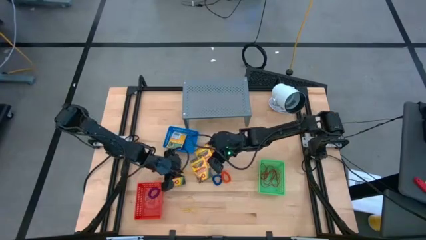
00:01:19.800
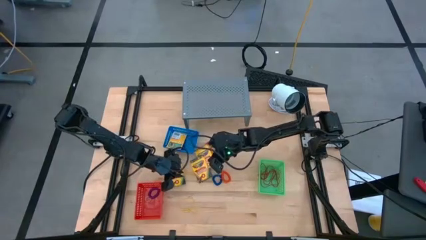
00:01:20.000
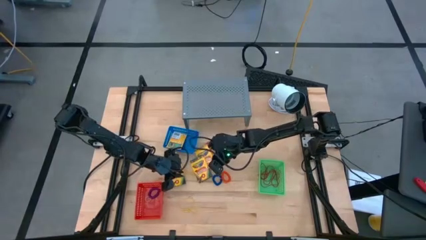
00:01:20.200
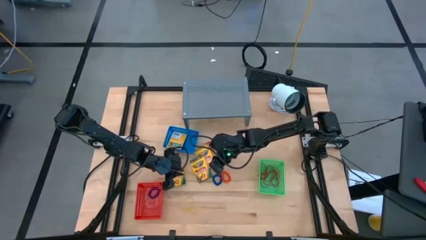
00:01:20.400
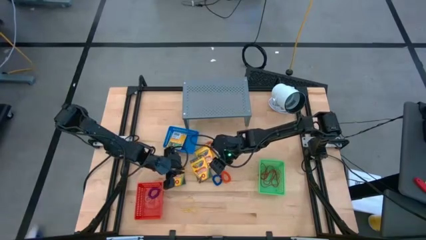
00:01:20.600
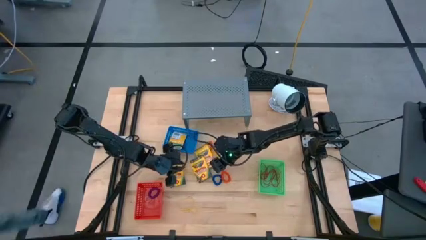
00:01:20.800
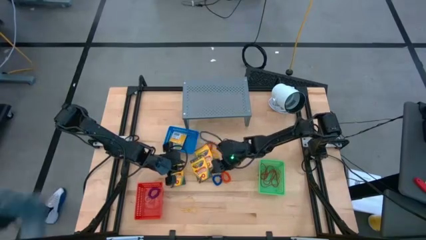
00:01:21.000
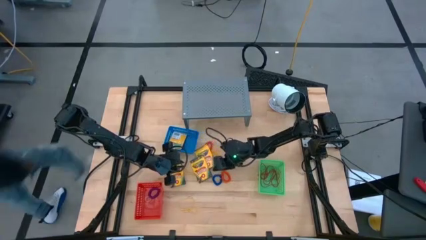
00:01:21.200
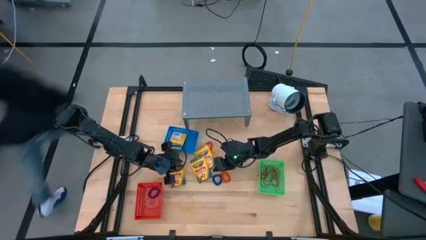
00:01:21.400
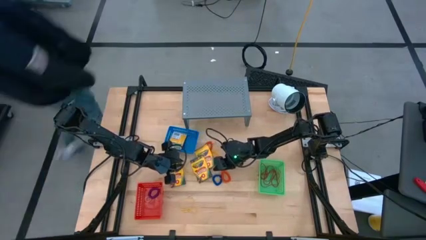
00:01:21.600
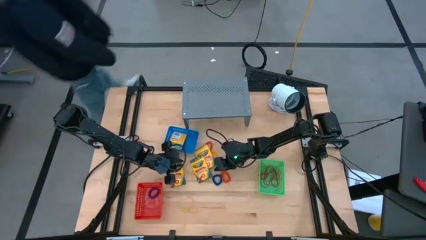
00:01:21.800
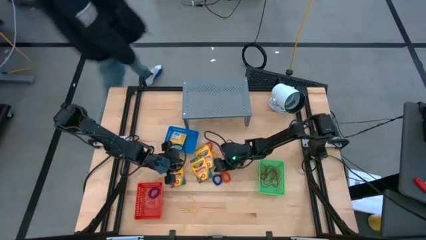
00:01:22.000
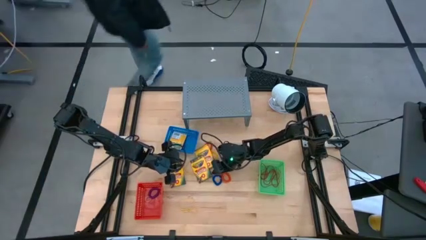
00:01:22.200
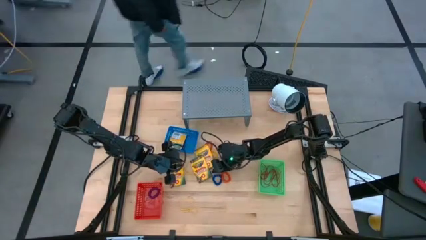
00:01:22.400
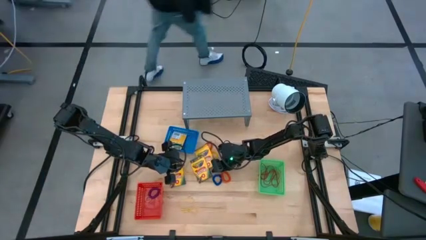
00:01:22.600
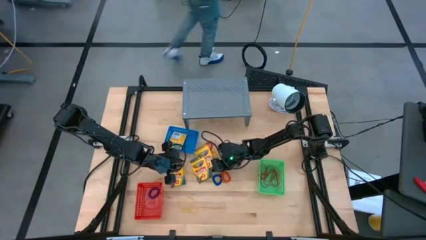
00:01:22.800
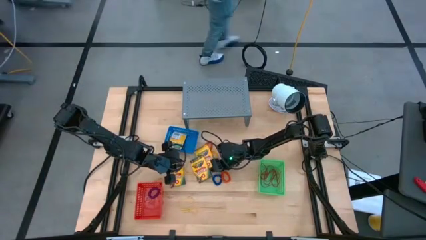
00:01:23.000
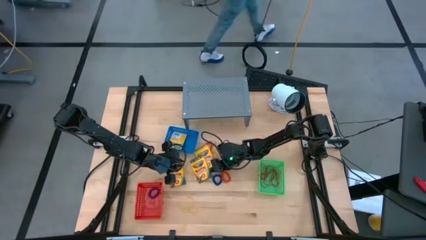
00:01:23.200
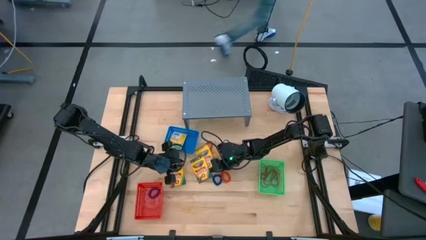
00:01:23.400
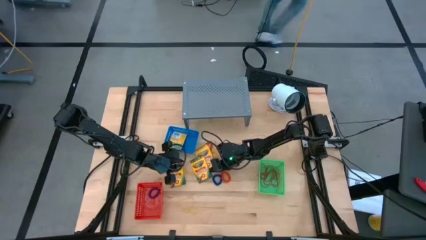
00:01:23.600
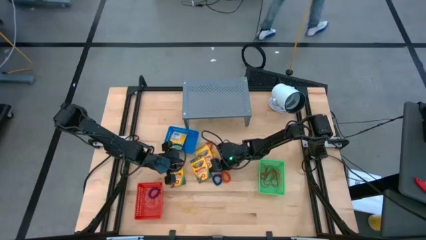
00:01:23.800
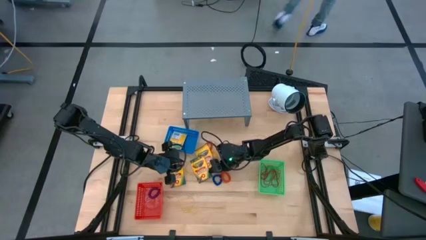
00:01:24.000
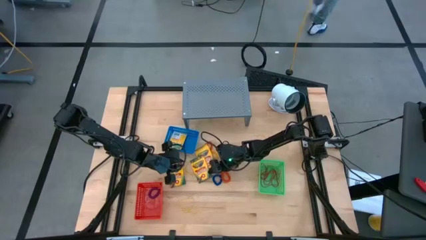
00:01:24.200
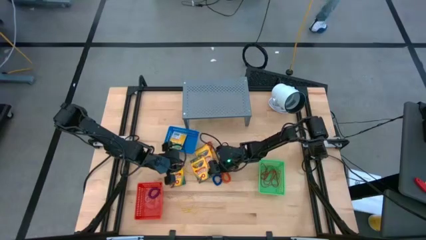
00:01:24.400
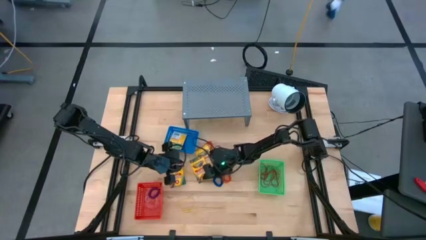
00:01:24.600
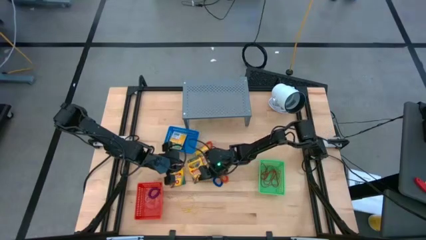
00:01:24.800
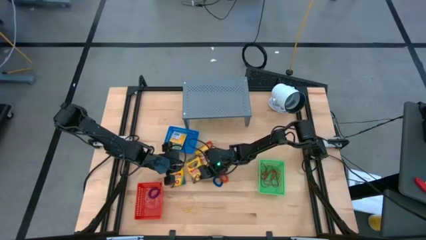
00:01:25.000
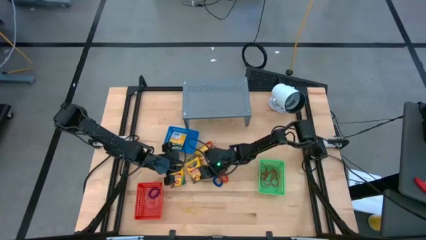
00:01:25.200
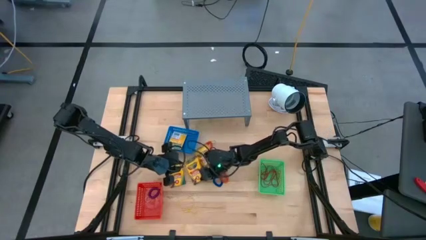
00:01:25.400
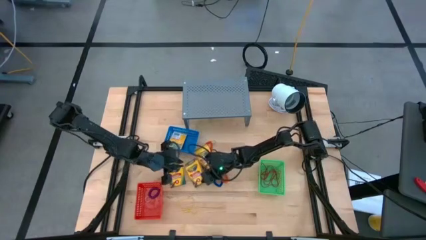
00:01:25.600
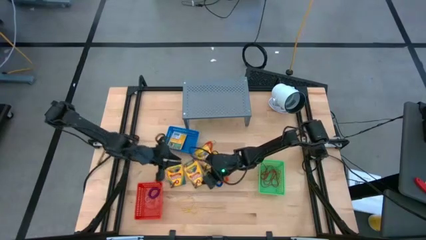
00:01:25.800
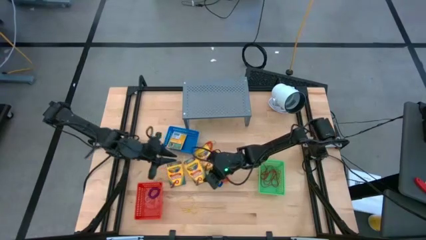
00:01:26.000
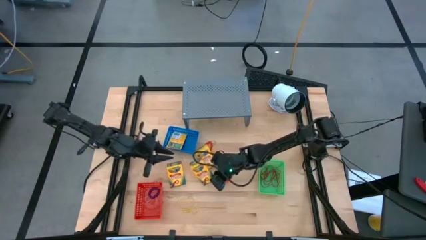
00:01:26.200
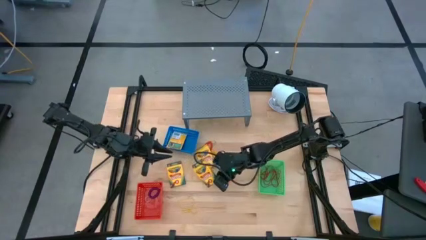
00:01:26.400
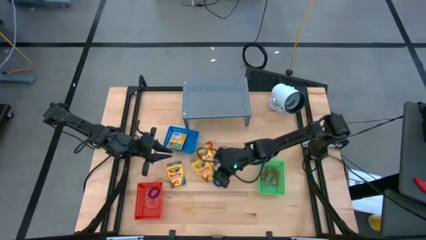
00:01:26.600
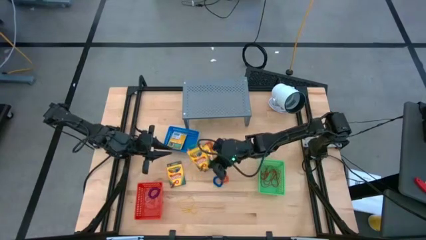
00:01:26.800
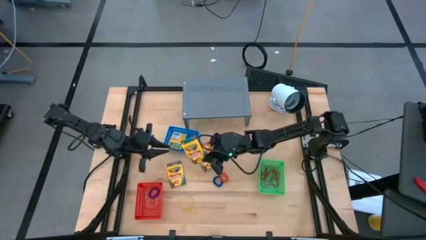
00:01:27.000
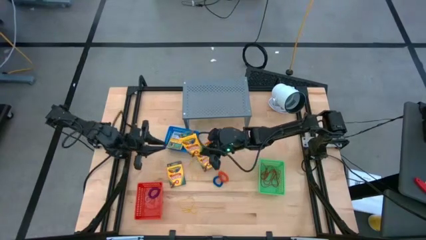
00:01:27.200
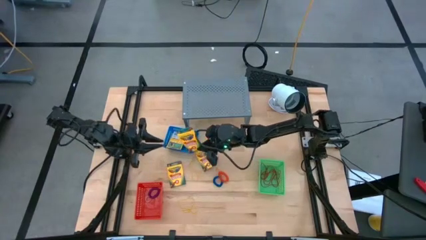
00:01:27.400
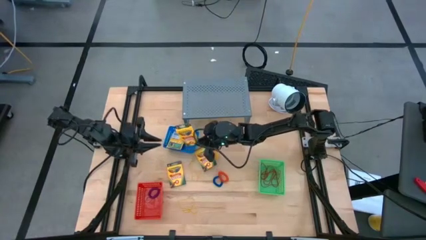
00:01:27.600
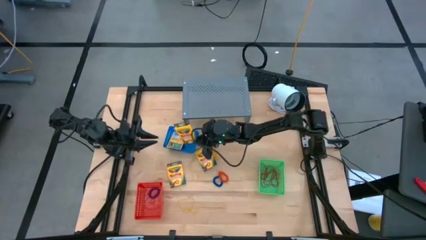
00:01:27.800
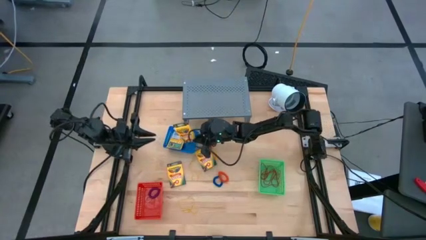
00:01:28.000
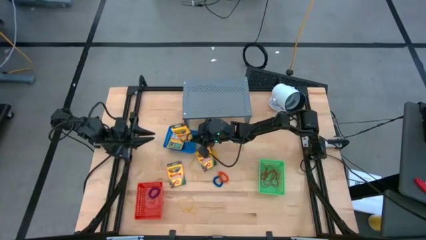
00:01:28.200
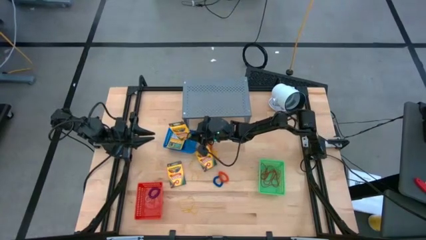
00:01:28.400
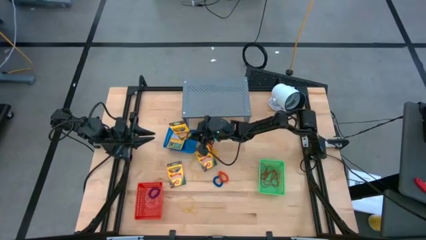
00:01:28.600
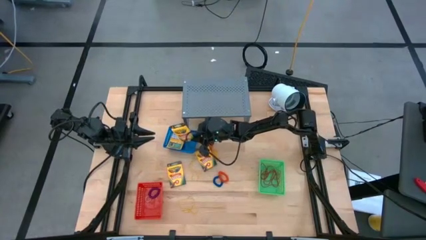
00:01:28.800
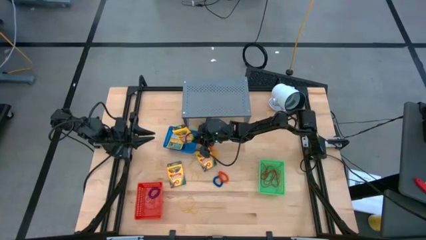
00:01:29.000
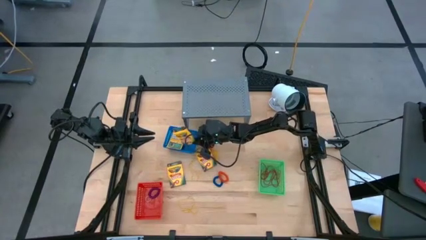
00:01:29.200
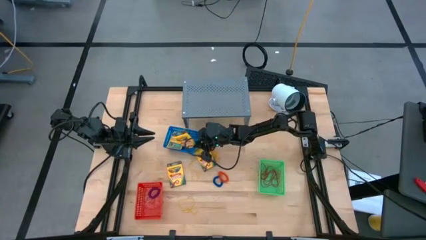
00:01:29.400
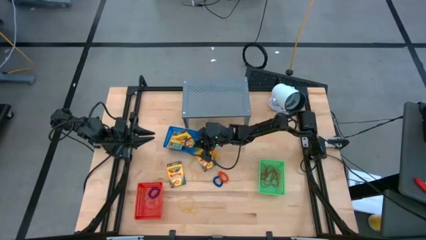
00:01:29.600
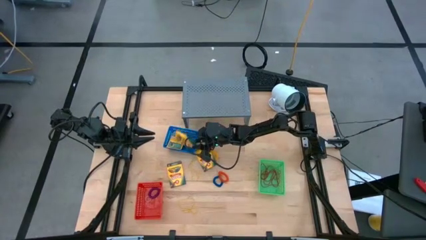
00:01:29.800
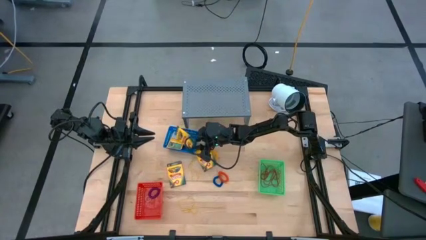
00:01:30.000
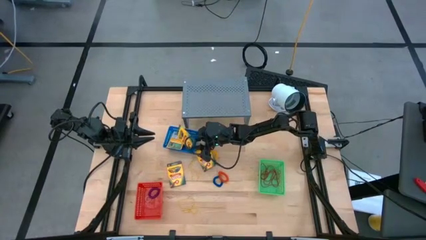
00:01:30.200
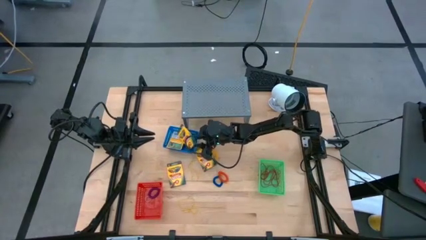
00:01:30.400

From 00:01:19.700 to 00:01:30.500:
Task: Pick & Place Office Desk Supplies
Put the yellow crayon box into the blue bin

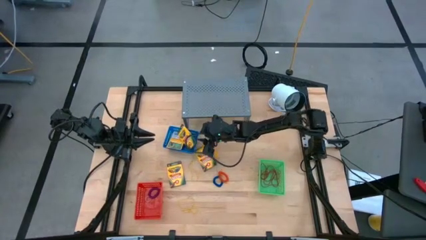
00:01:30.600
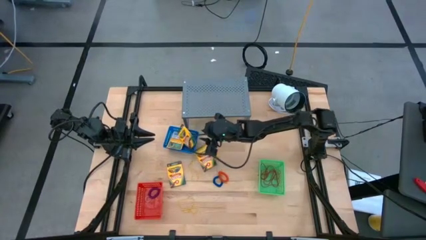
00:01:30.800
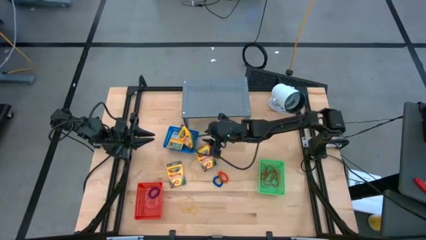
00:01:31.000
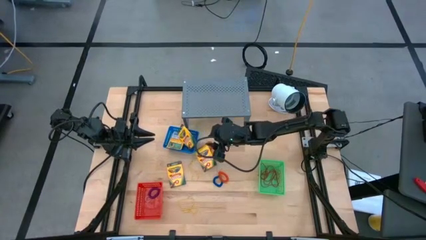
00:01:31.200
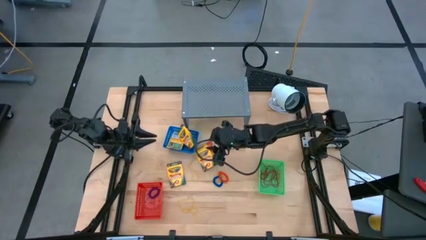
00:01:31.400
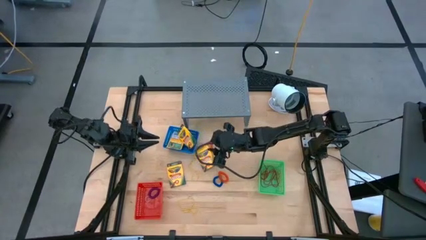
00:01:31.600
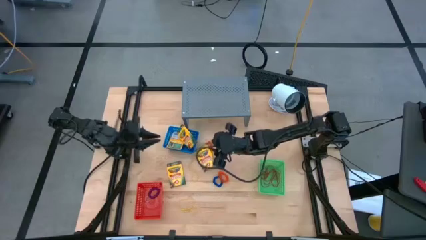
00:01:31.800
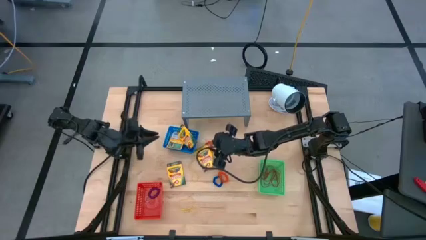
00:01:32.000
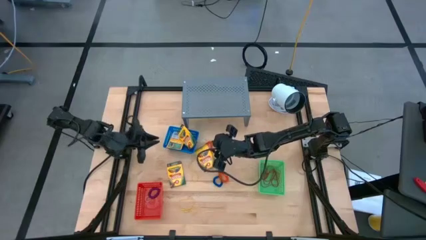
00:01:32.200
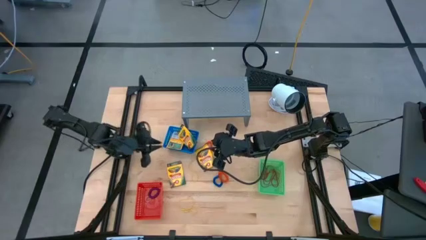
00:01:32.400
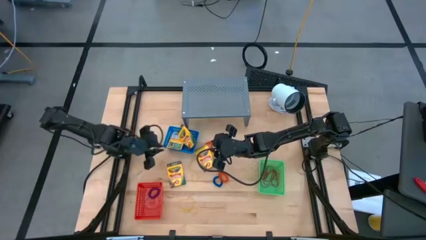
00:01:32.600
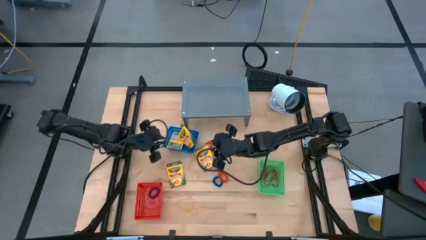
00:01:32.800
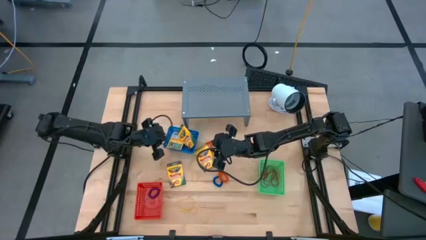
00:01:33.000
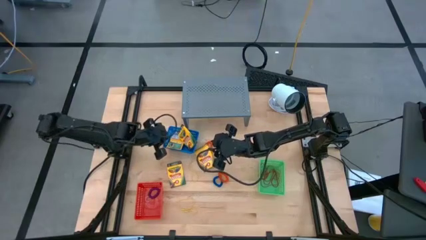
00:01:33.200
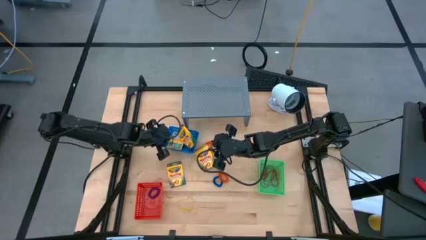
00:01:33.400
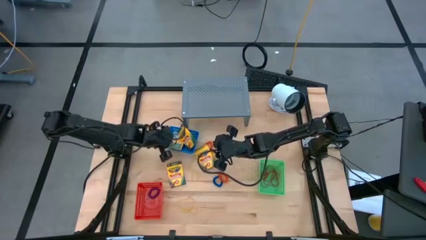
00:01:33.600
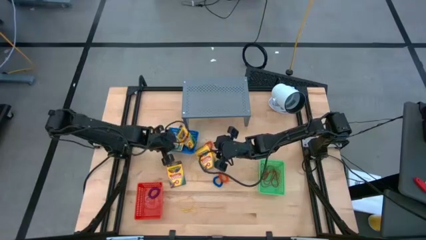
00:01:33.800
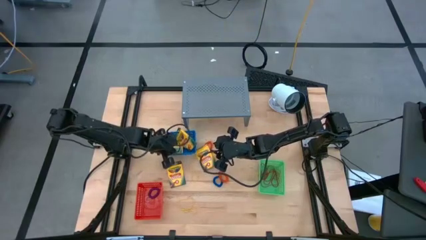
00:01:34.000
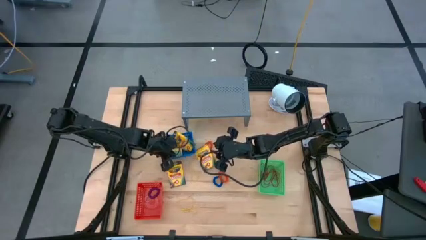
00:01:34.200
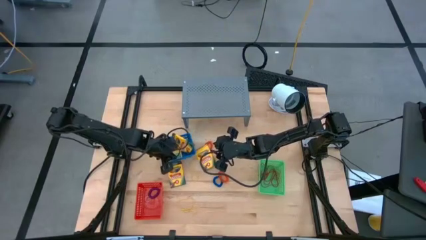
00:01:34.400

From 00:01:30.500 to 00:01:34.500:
Adjust the blue bin
